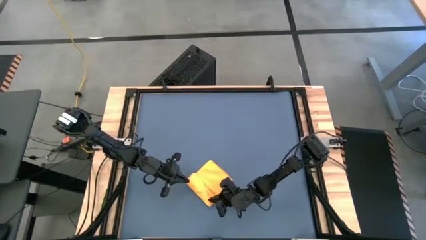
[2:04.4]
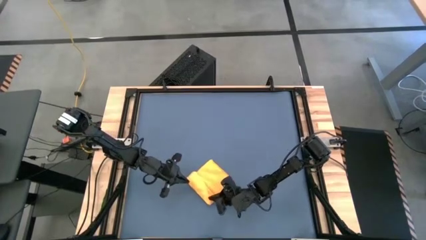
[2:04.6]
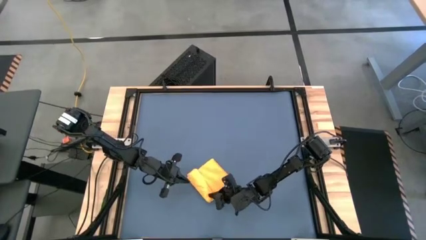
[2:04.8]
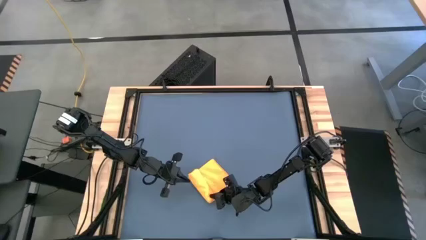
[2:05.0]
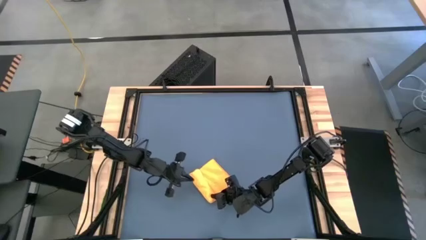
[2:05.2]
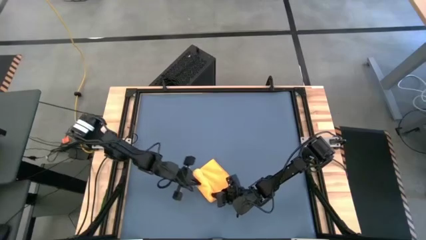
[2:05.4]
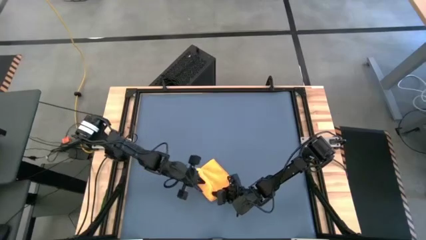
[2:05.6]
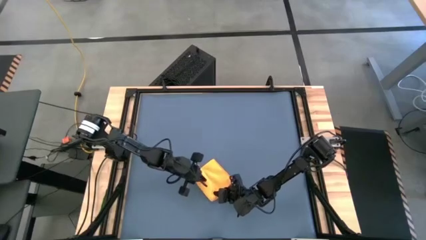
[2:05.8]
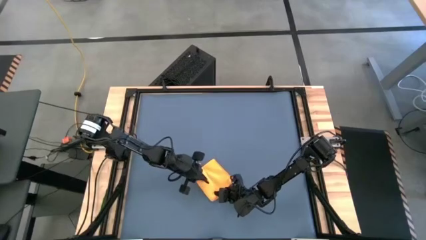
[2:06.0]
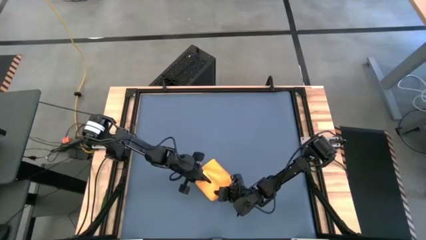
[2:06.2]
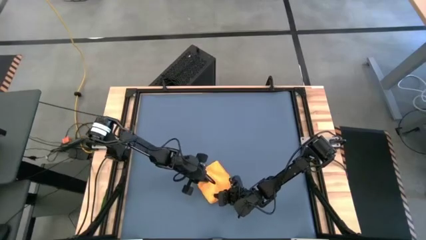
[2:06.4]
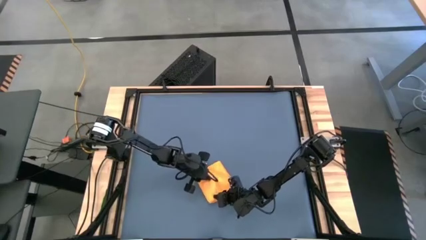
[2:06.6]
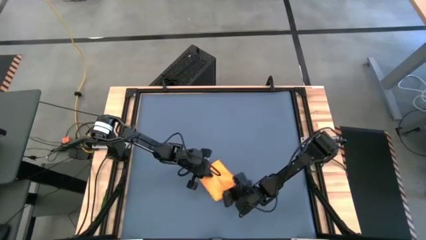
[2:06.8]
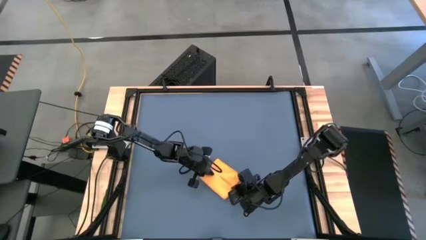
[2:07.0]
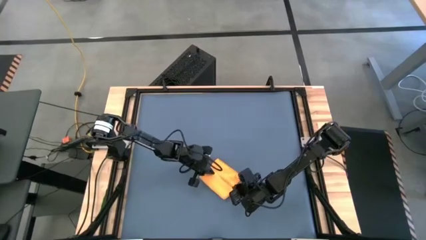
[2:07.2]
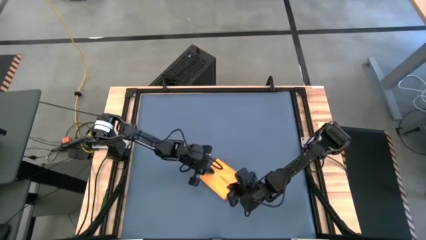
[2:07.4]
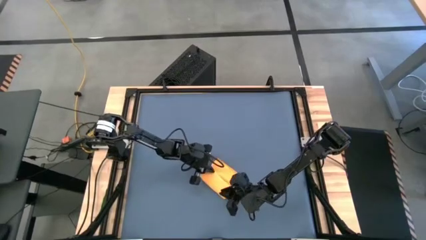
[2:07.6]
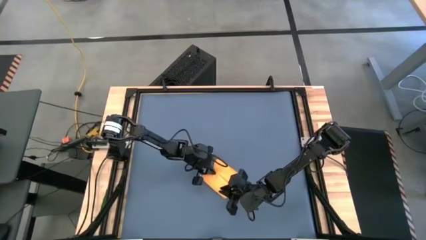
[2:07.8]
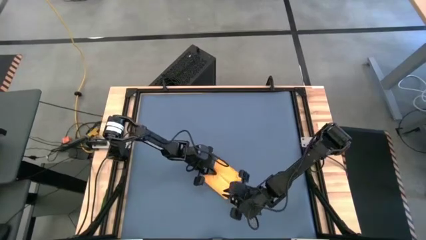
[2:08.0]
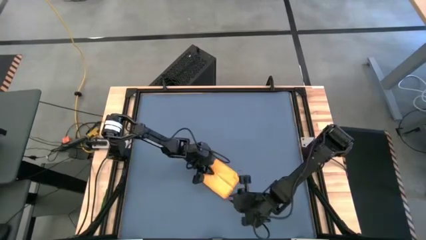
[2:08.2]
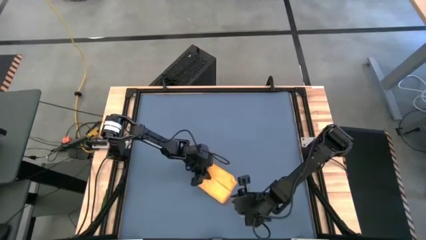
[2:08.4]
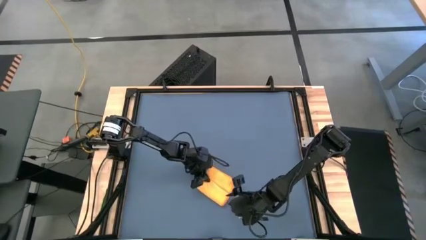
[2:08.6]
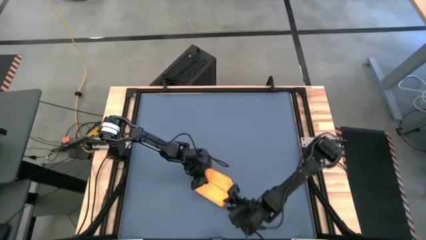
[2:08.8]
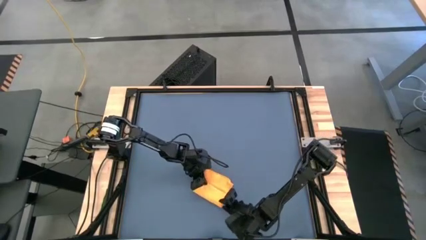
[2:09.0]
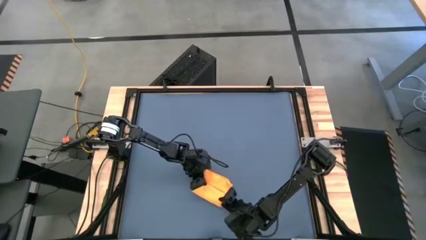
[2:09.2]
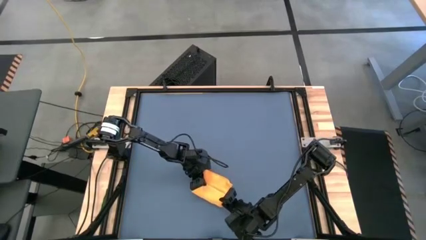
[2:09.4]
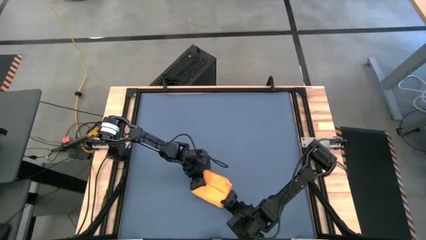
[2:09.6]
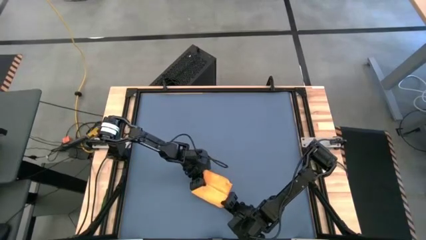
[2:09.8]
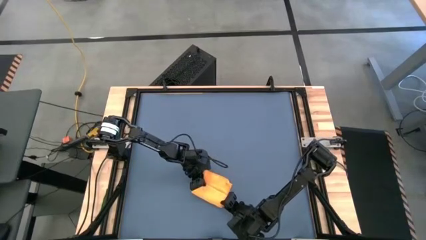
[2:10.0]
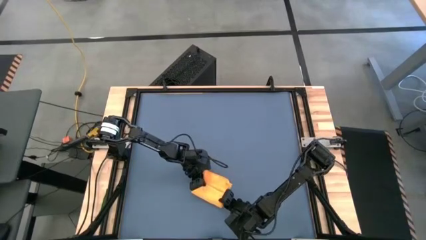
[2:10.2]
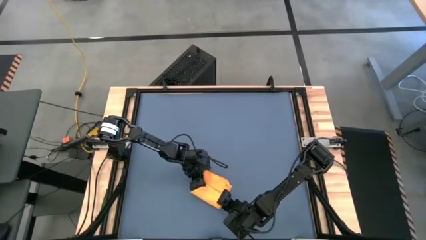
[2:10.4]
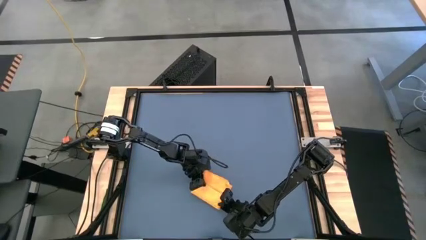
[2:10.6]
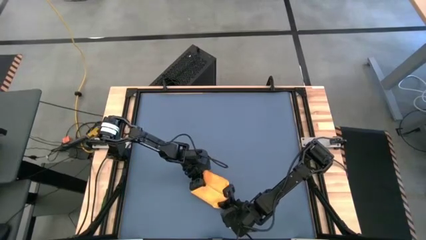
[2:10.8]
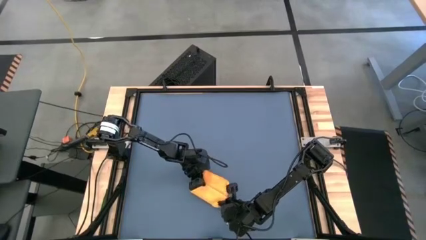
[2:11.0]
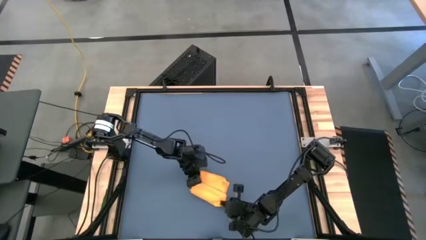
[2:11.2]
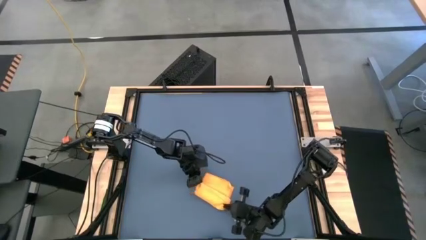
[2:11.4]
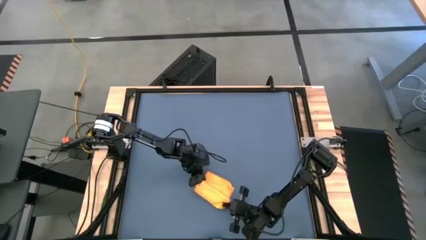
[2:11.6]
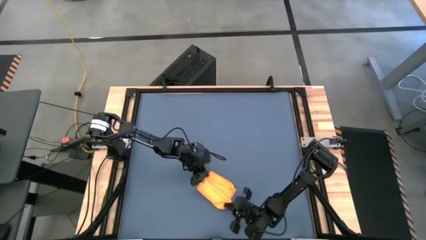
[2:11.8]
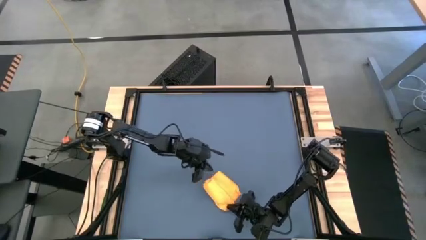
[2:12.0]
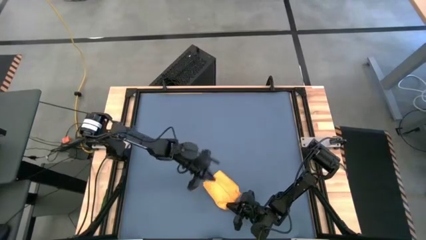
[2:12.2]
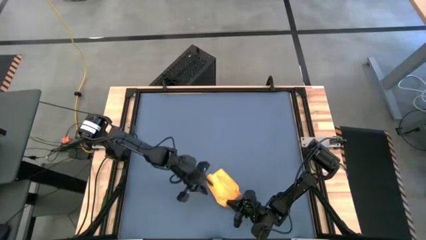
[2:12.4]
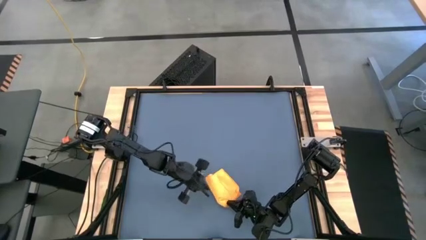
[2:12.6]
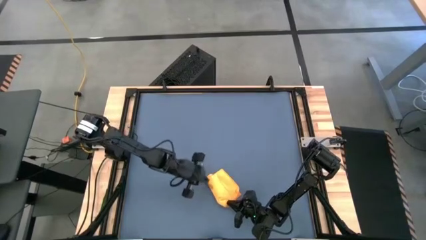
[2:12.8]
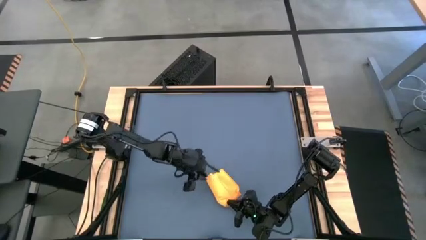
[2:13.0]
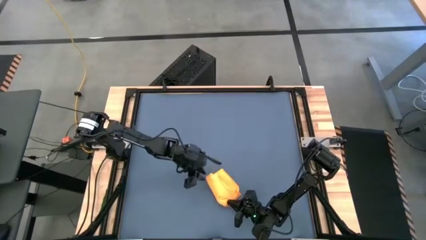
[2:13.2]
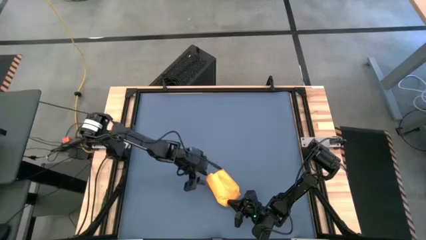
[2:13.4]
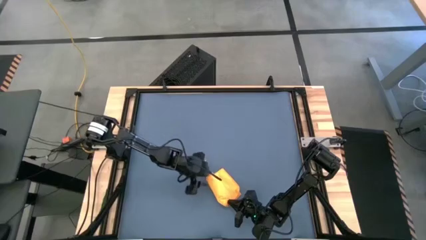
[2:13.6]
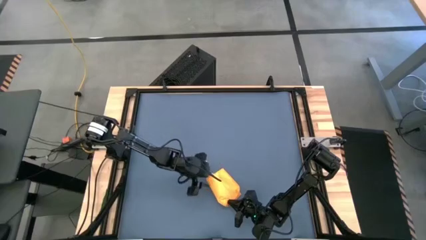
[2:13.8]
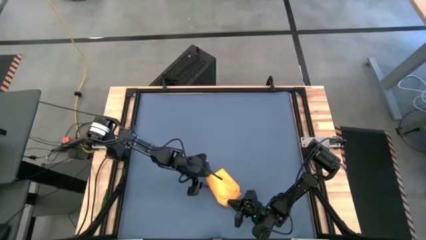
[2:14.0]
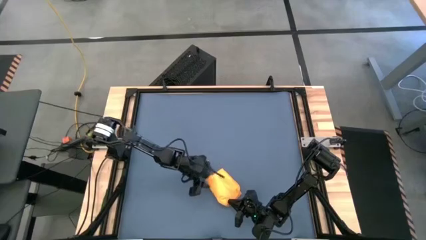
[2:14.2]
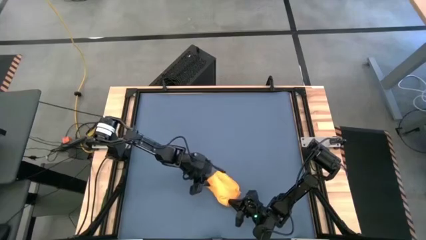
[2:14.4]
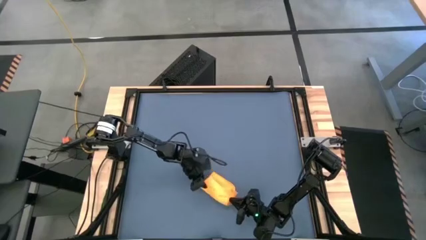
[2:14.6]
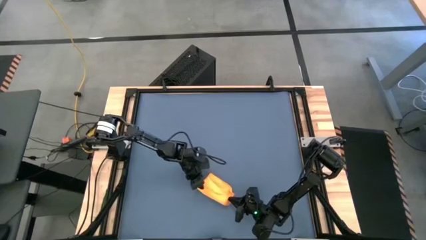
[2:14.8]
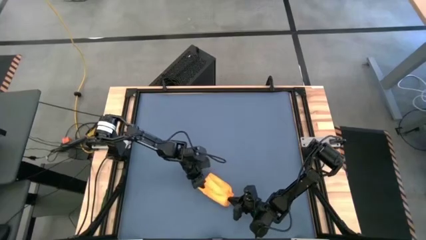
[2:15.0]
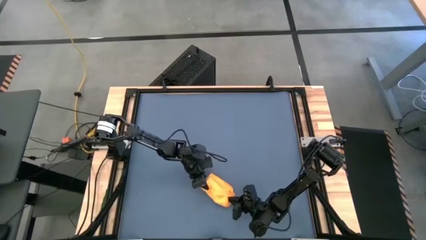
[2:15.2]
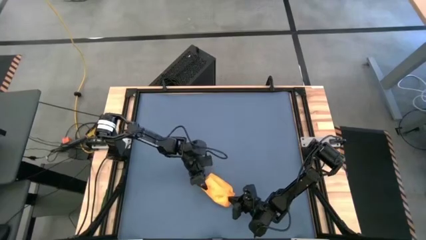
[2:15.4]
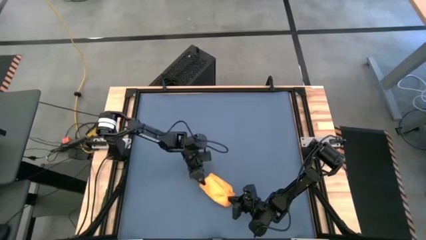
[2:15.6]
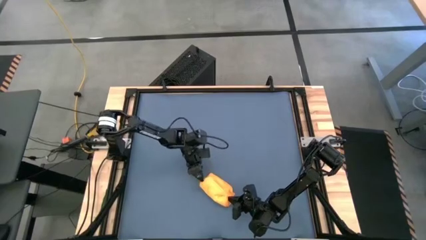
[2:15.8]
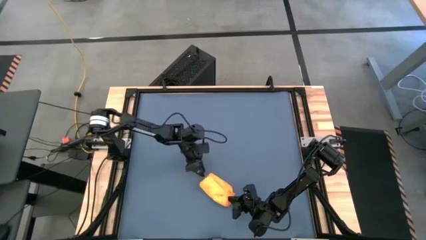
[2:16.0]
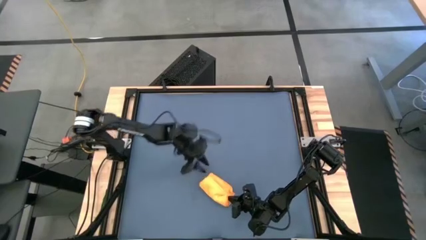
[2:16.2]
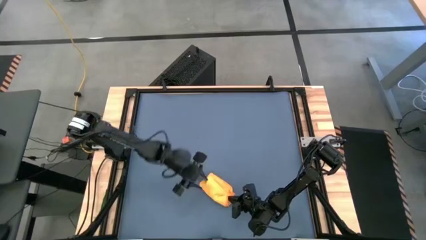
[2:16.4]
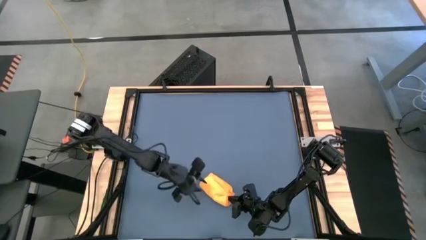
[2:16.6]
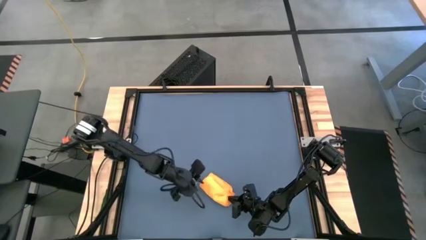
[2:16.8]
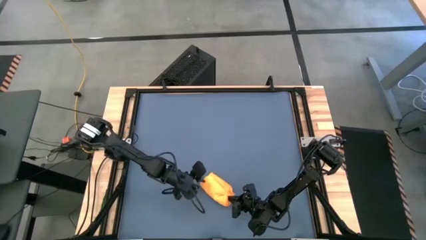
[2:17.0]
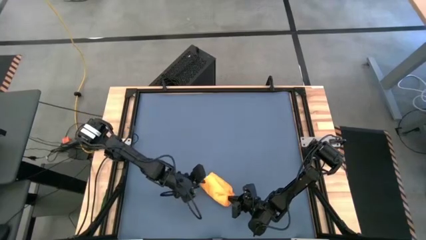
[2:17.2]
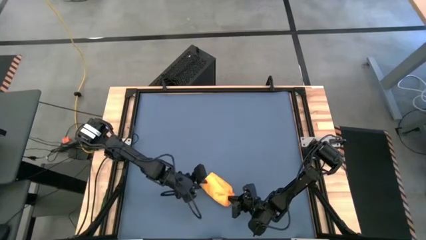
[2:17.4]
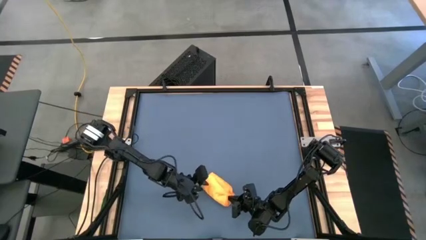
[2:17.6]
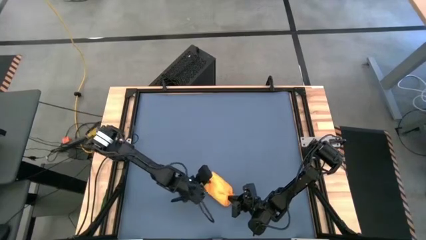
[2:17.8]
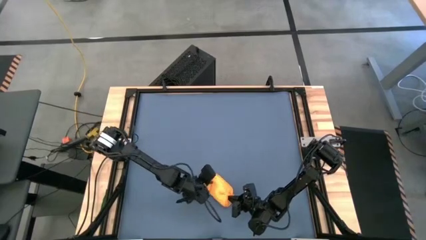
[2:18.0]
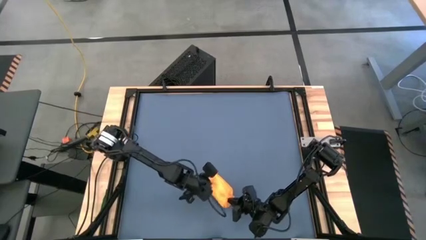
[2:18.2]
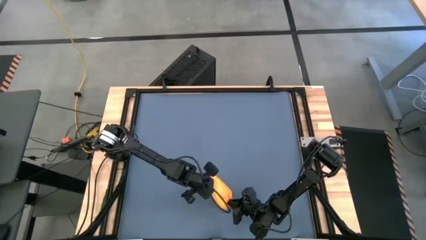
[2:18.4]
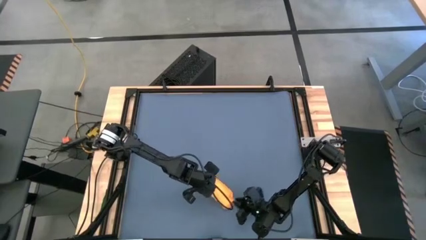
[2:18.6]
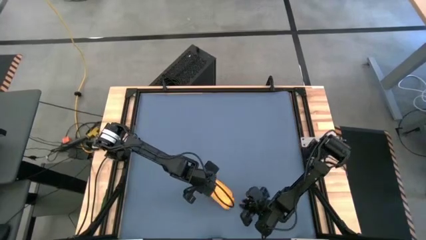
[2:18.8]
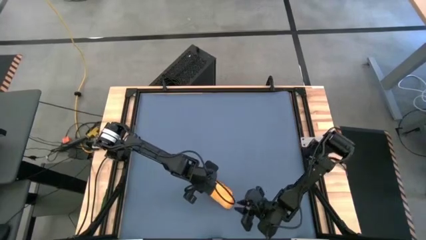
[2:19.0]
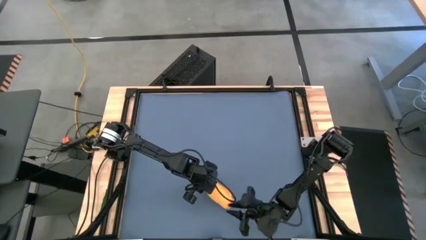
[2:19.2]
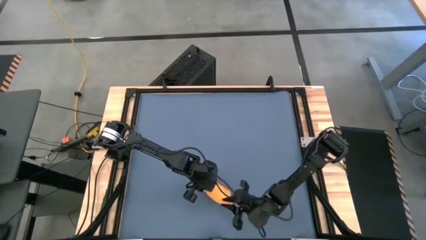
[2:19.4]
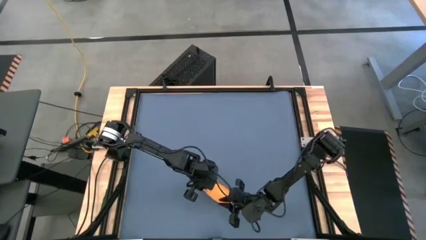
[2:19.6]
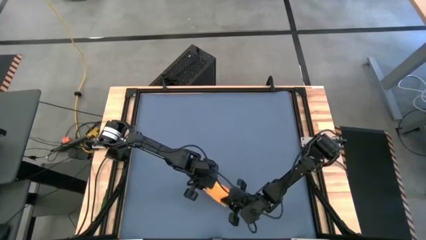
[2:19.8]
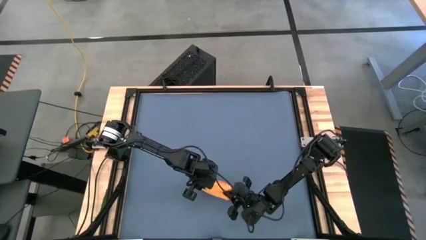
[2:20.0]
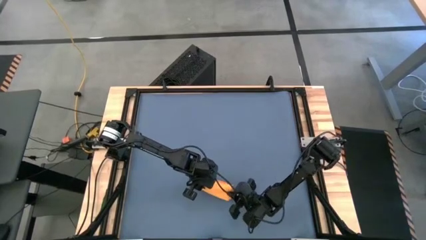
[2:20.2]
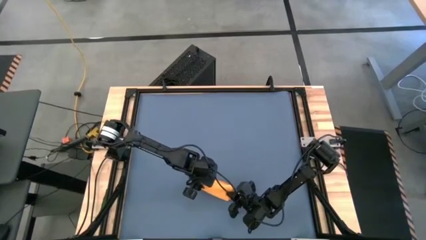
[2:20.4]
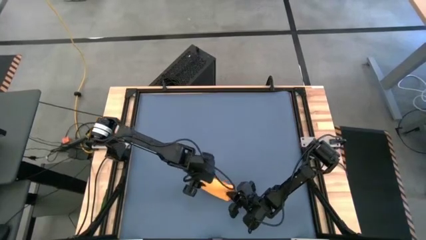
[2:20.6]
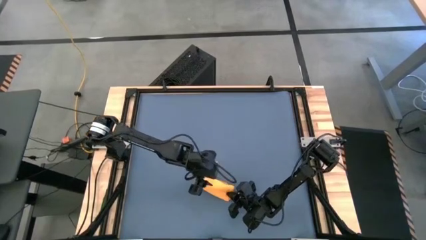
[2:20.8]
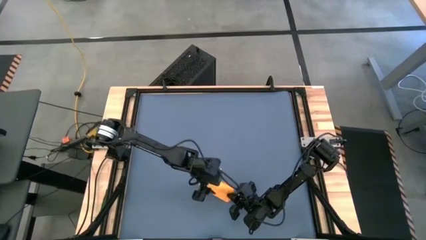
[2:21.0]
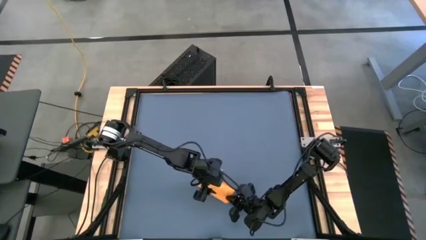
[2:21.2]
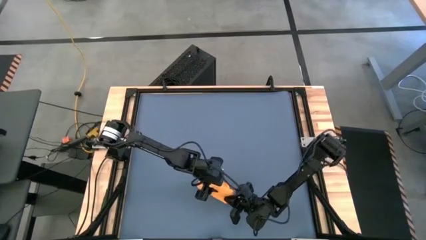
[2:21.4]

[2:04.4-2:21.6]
Task: Roll towel
Roll the yellow towel
